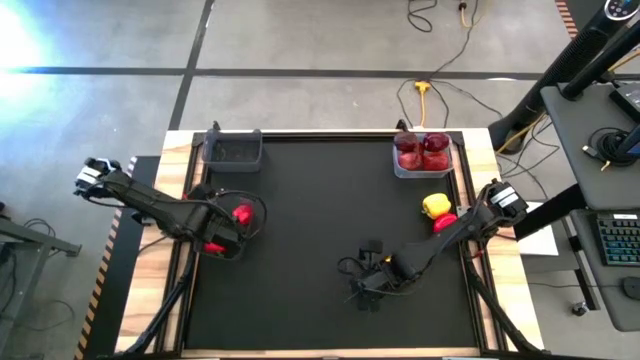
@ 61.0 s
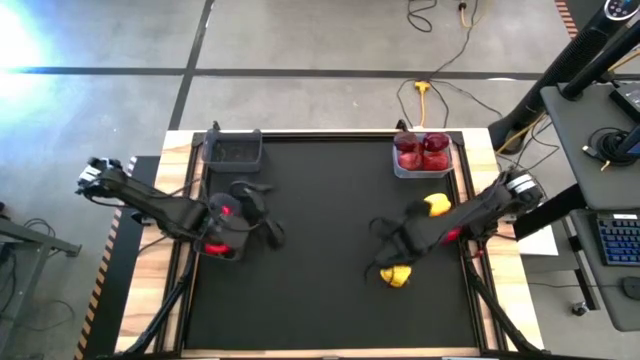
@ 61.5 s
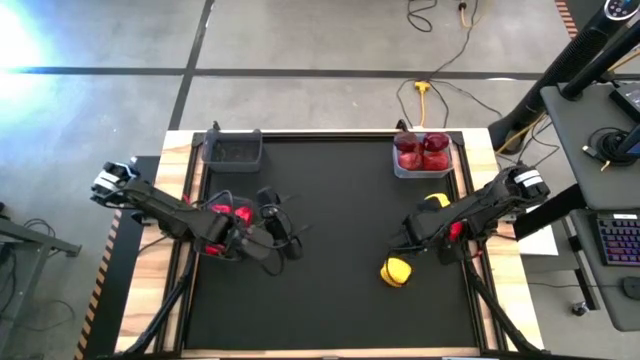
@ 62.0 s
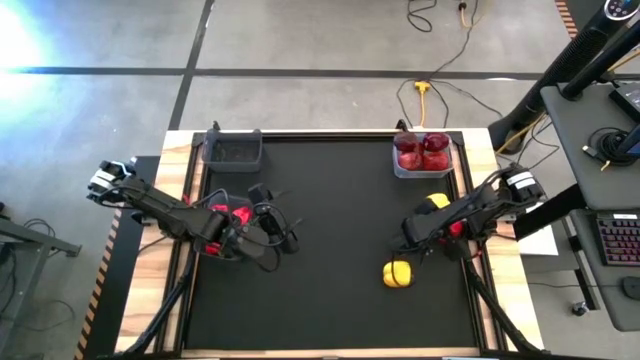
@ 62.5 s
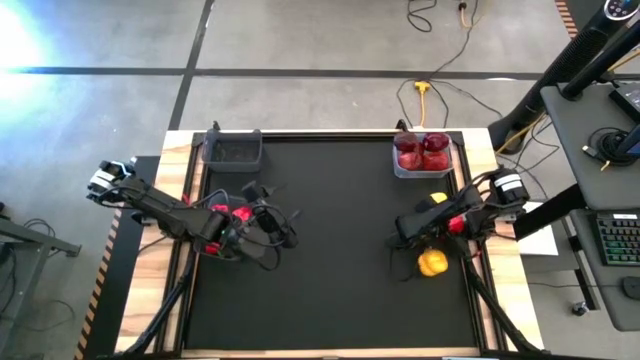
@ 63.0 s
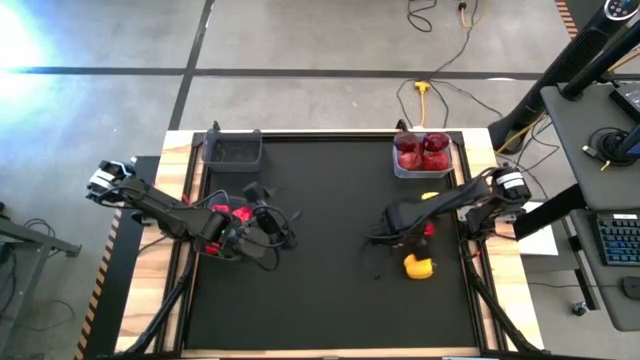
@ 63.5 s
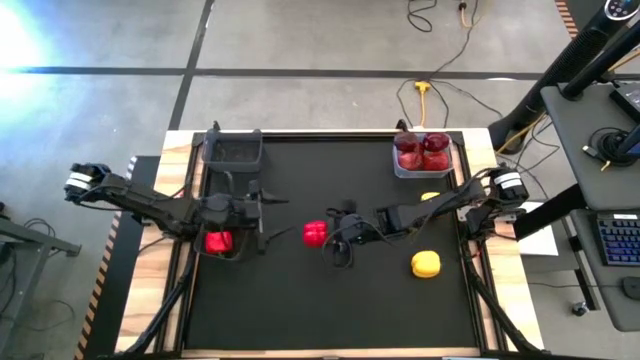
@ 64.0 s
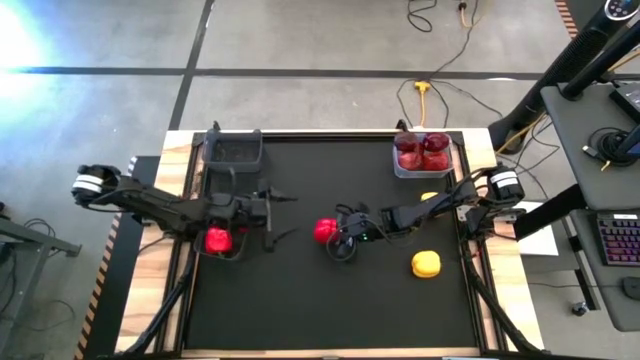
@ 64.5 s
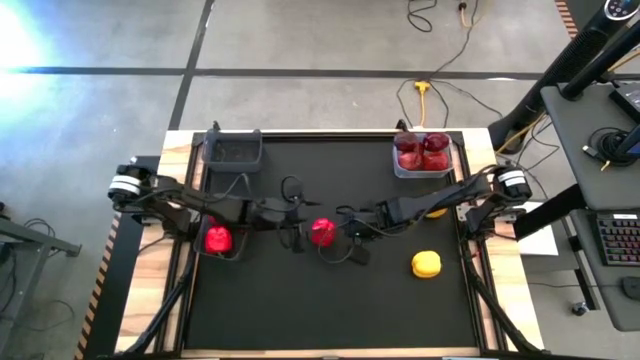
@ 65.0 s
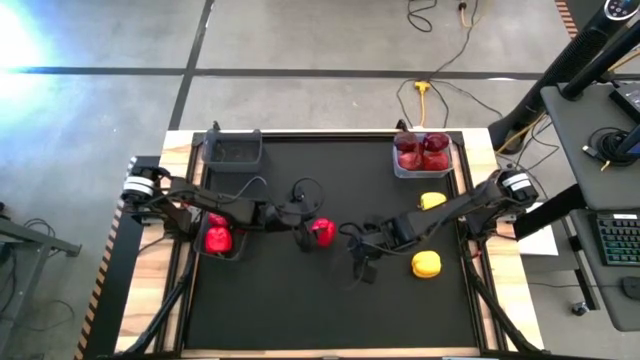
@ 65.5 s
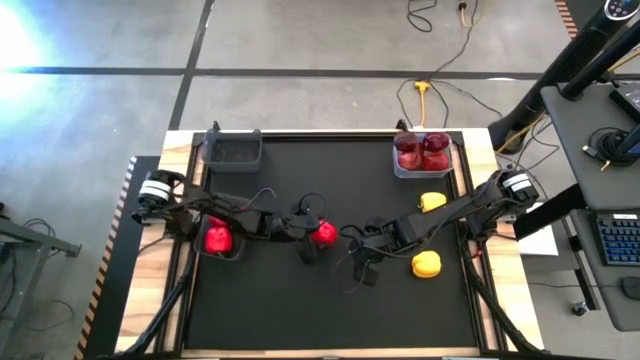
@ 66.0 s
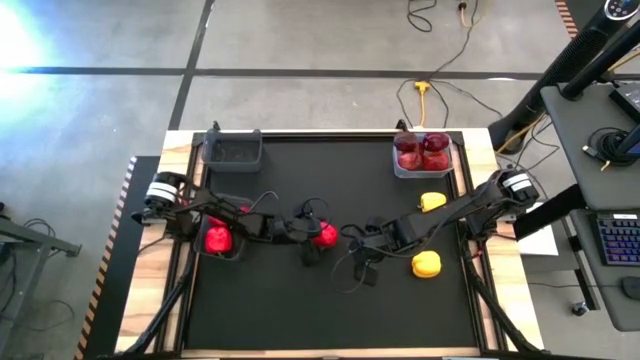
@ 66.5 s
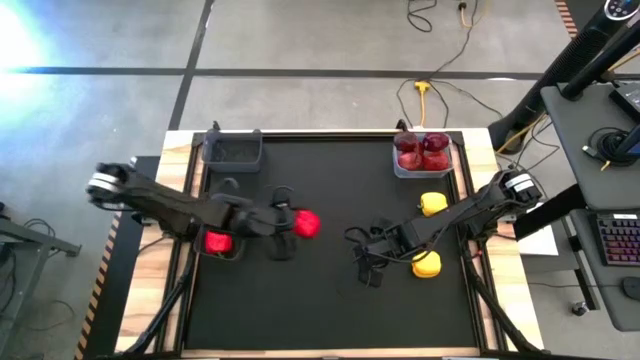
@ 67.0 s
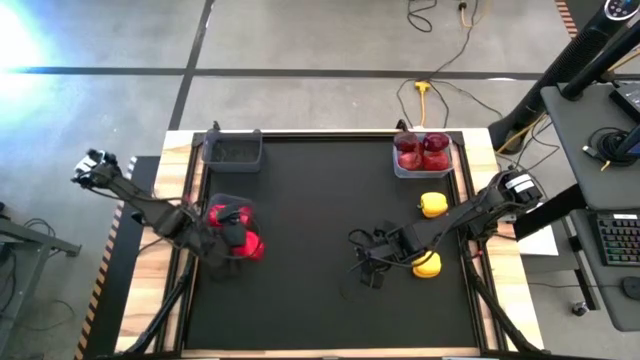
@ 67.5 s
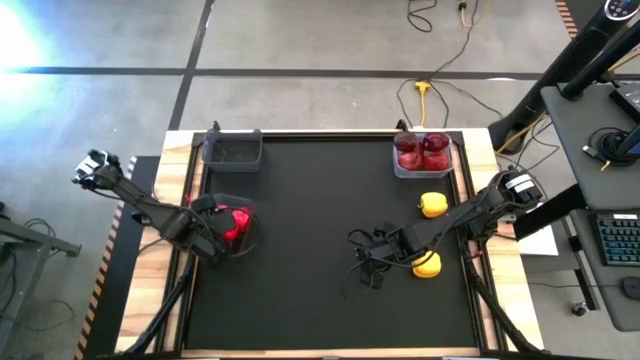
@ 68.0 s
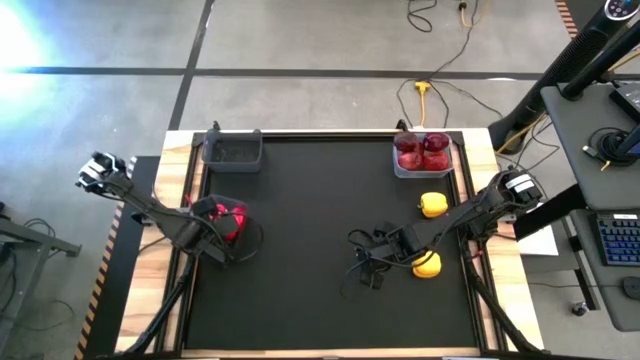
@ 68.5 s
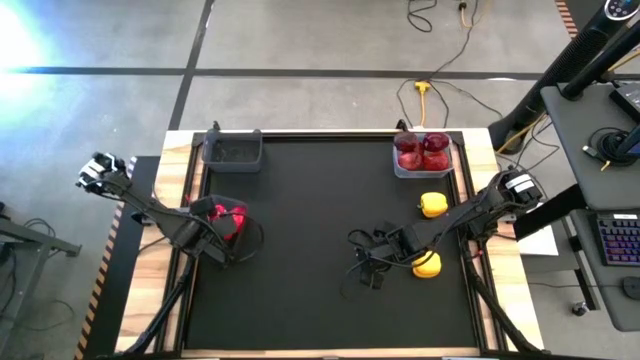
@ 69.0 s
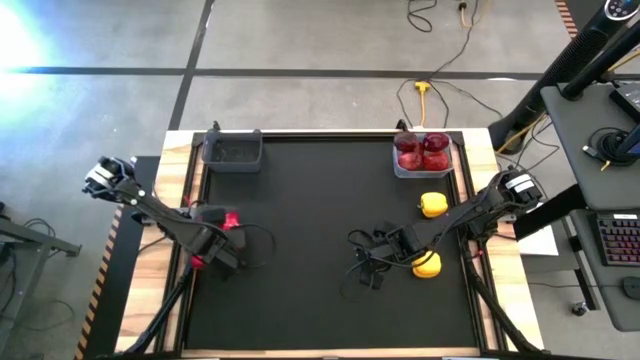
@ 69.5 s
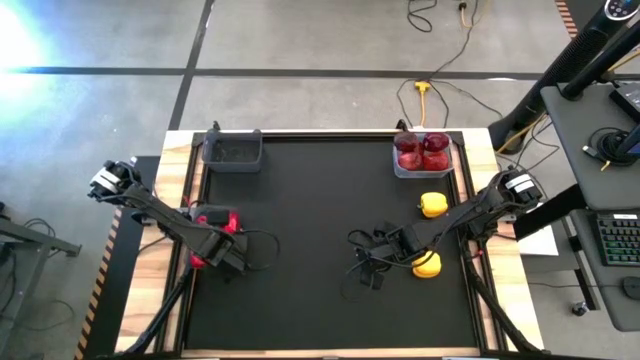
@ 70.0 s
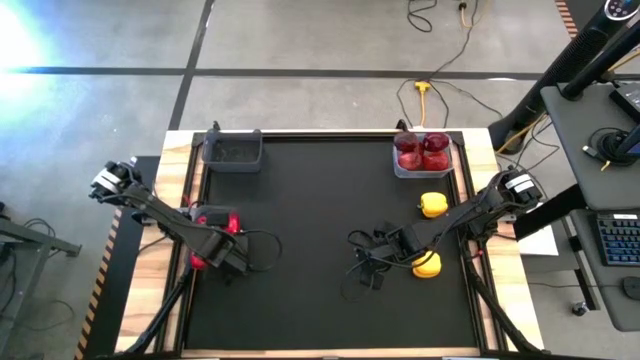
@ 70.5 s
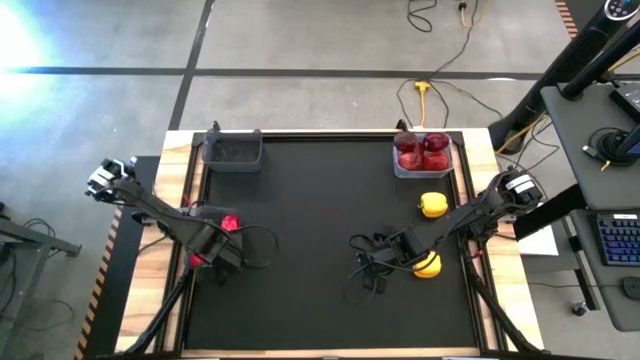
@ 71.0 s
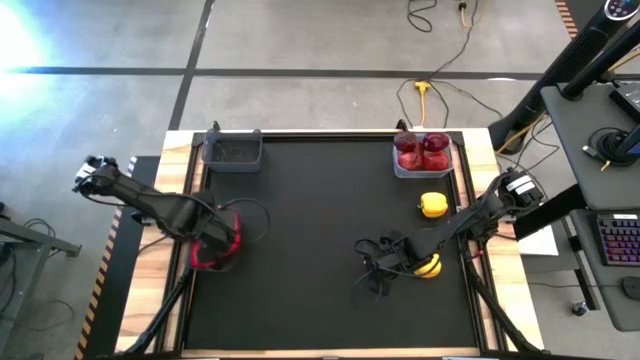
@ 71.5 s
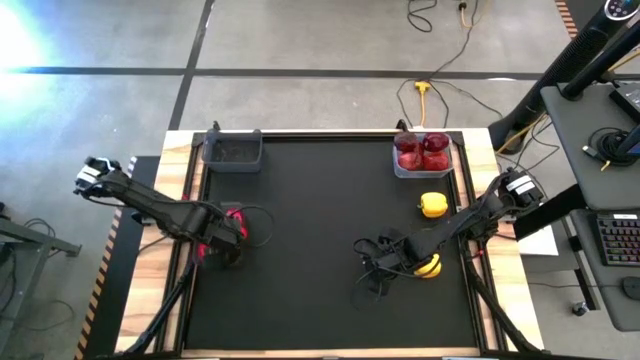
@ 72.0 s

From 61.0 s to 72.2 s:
Task: Sort produce into baskets
Put the red bell pepper into the bottom black bin

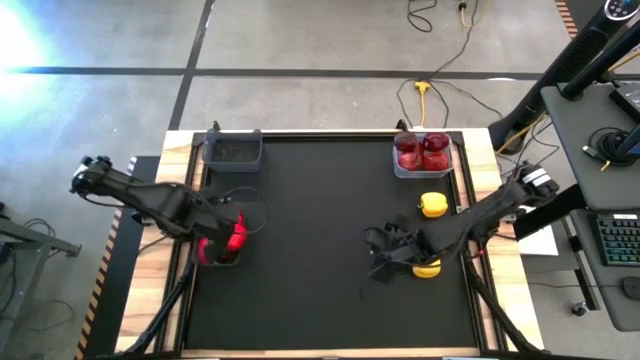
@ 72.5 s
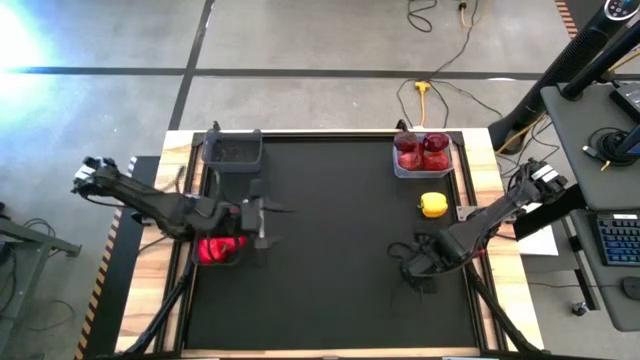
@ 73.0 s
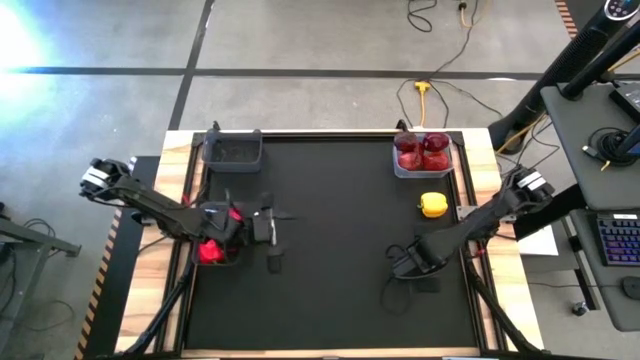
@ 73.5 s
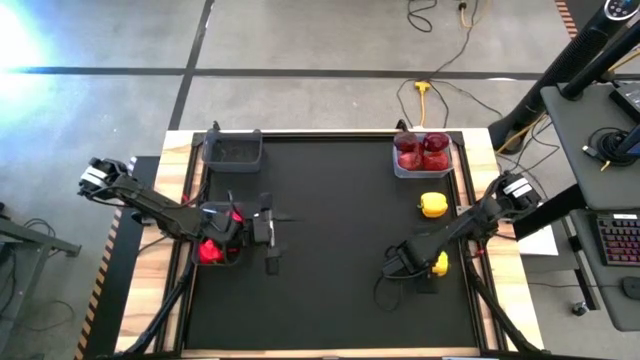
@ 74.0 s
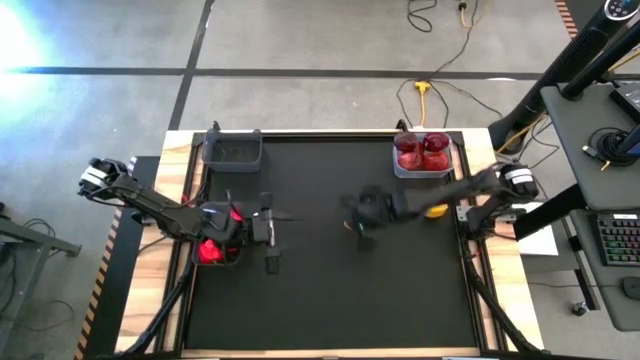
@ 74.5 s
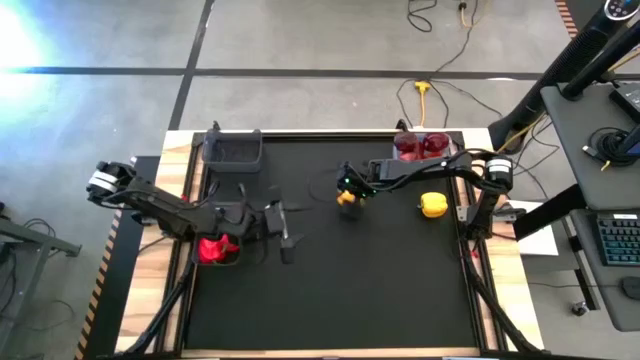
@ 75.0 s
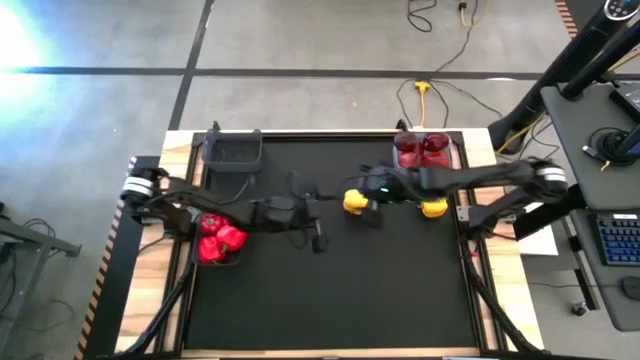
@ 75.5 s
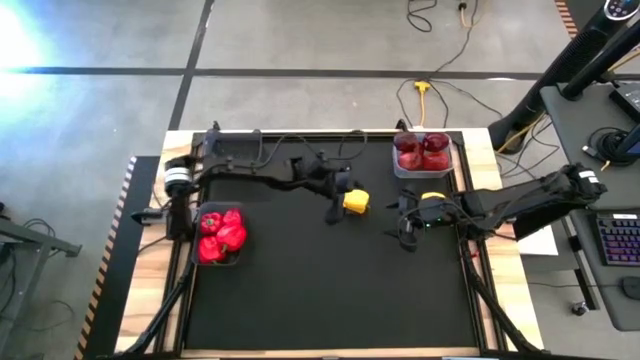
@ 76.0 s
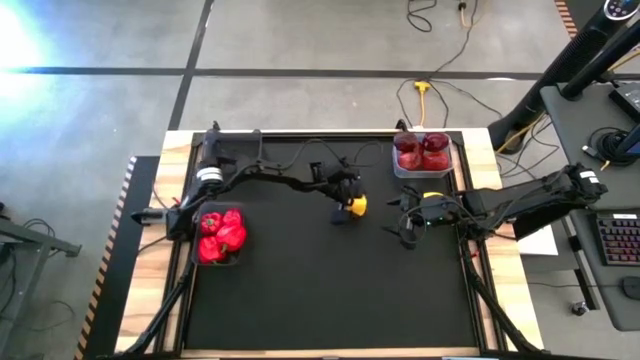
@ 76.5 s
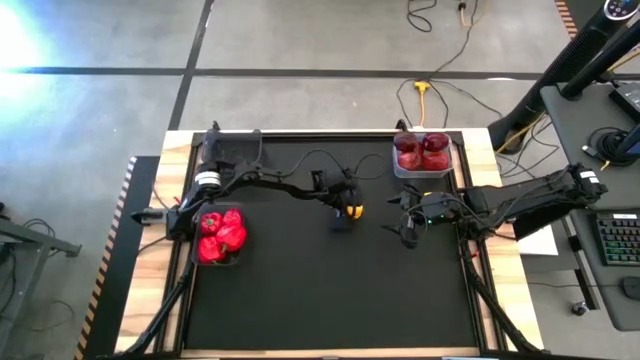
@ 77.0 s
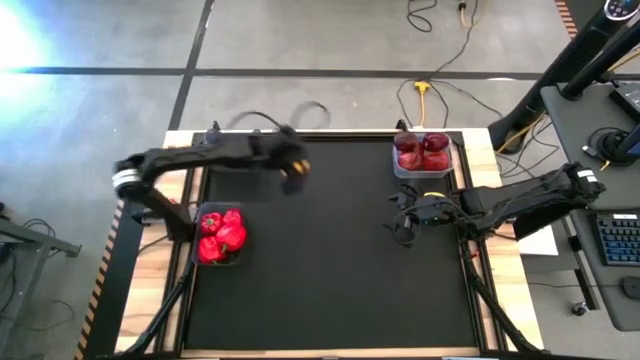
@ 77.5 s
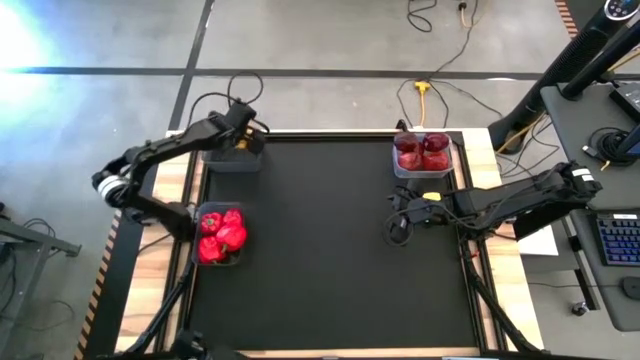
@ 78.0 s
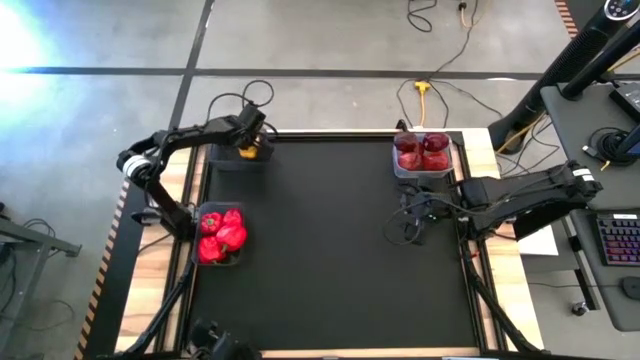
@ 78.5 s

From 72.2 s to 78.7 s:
Put the bottom yellow bell pepper into the top black bin

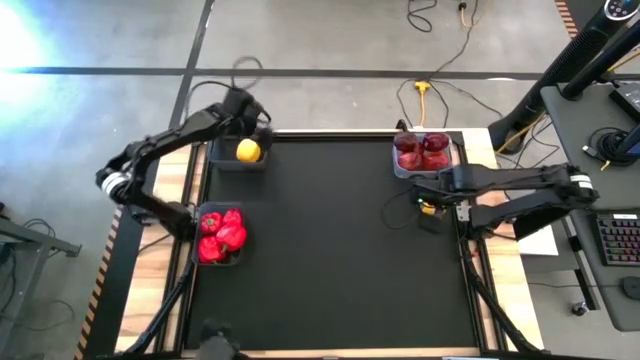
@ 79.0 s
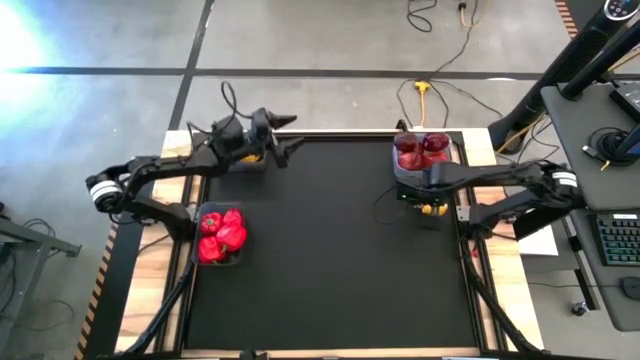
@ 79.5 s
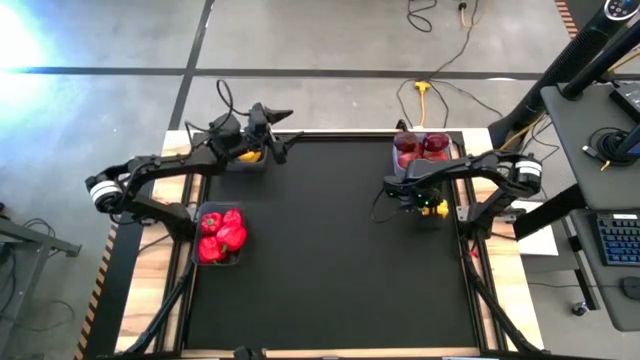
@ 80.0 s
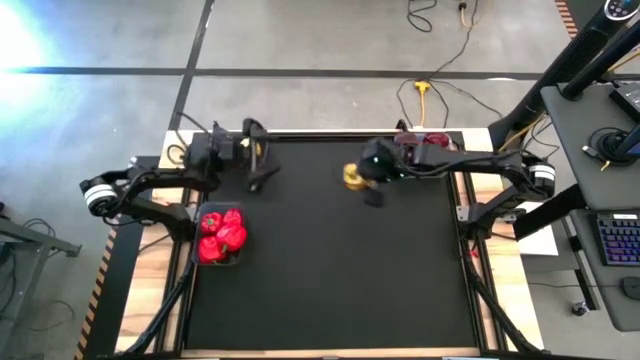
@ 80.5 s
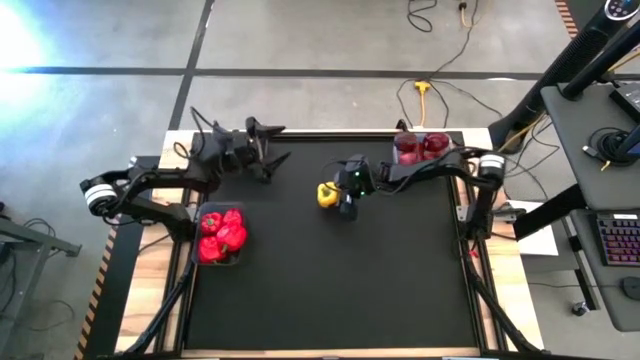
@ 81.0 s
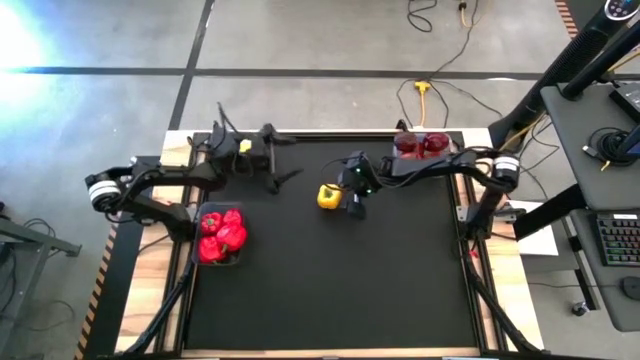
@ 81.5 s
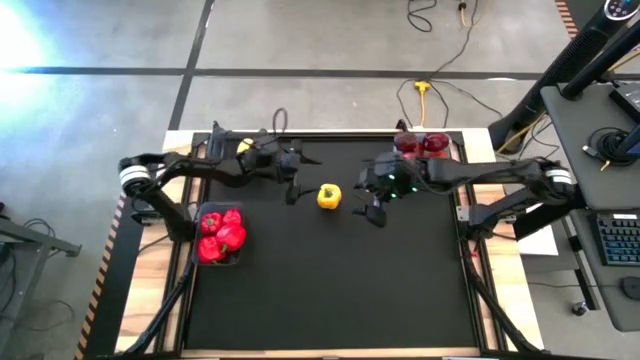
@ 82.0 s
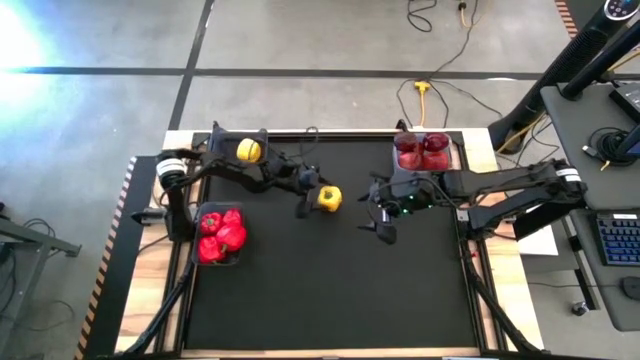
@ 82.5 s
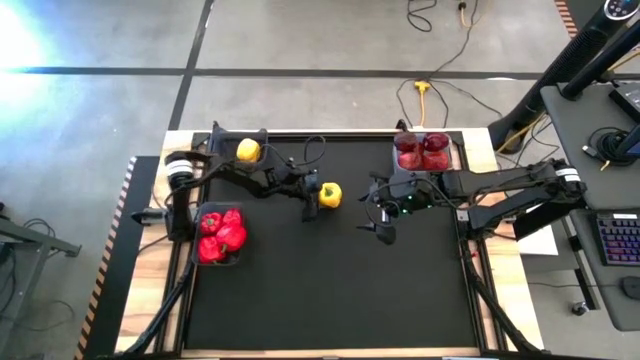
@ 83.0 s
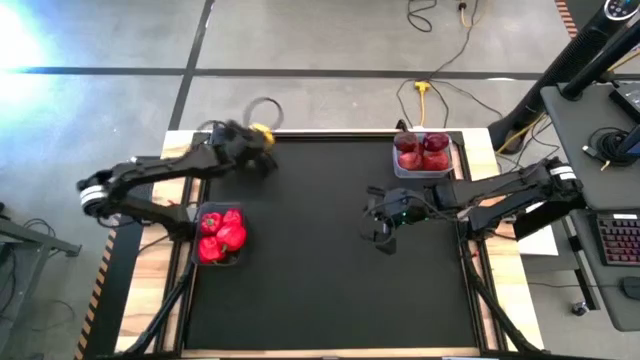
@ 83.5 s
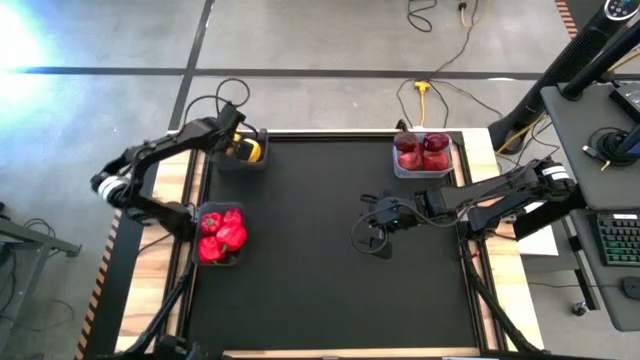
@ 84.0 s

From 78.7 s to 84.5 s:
Put the yellow bell pepper into the top black bin
